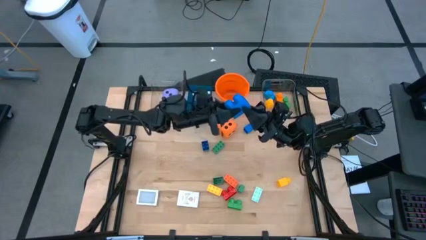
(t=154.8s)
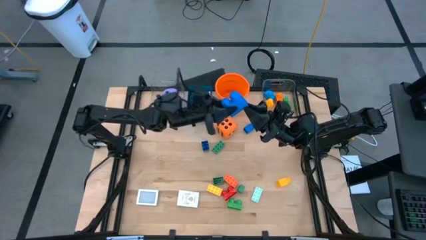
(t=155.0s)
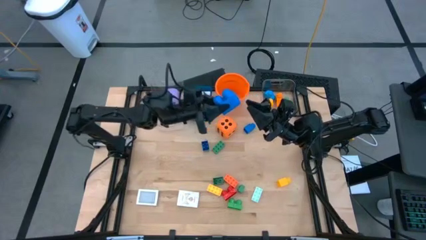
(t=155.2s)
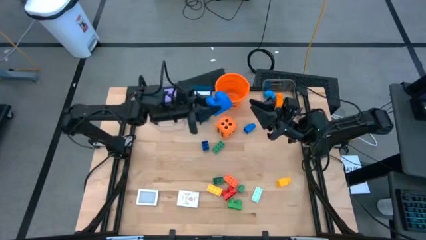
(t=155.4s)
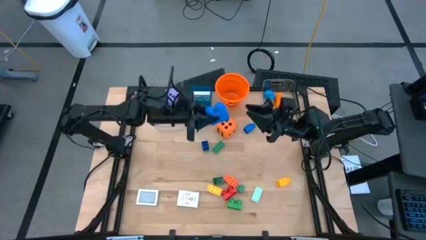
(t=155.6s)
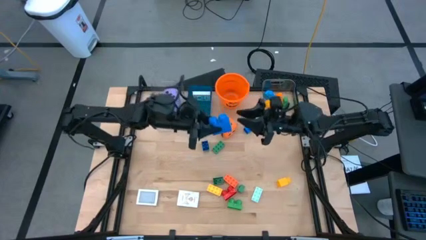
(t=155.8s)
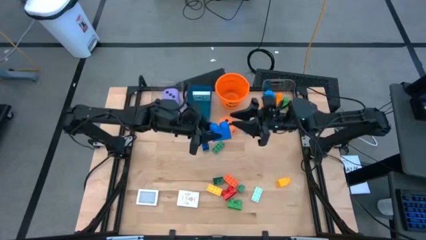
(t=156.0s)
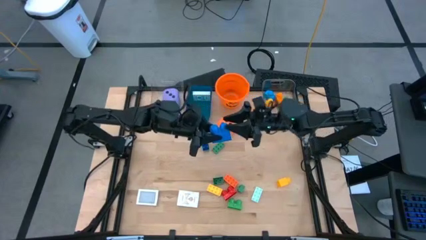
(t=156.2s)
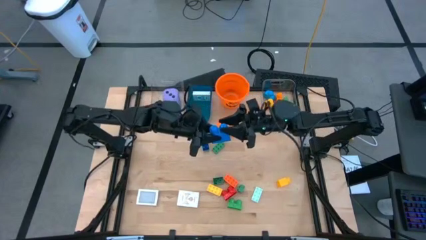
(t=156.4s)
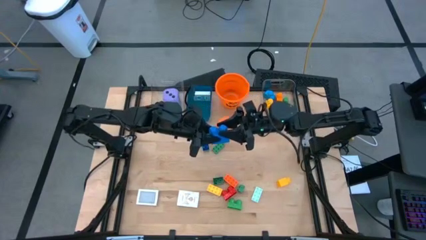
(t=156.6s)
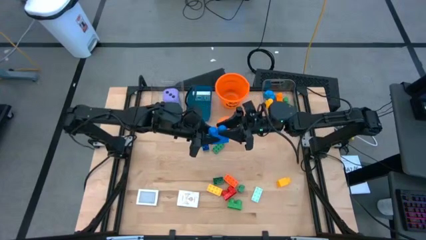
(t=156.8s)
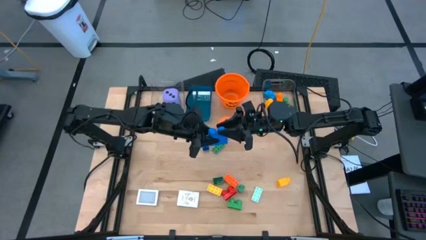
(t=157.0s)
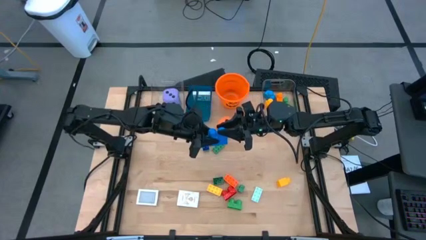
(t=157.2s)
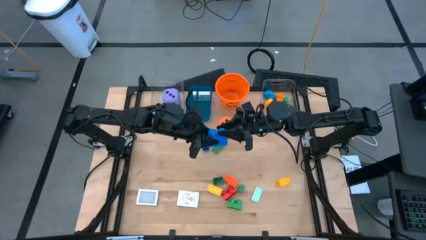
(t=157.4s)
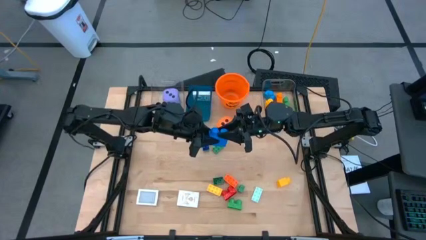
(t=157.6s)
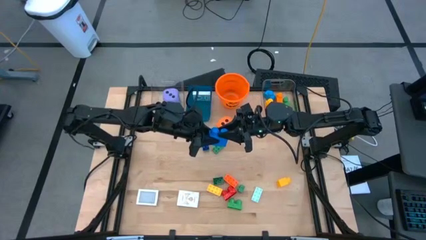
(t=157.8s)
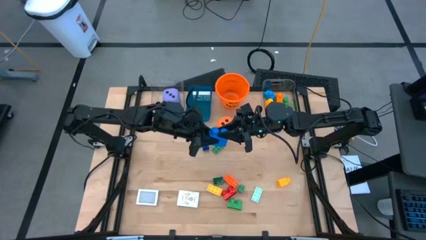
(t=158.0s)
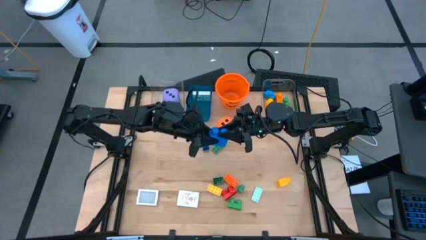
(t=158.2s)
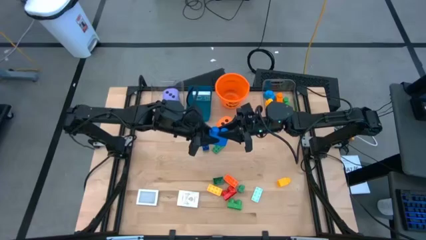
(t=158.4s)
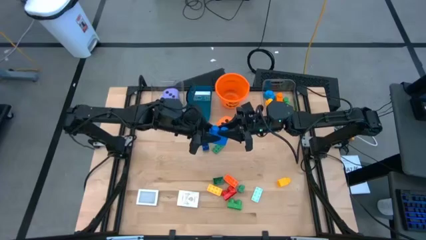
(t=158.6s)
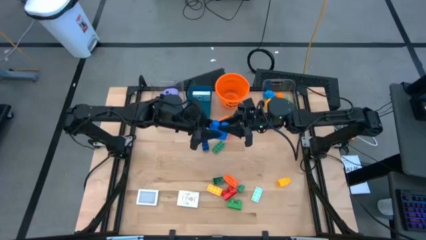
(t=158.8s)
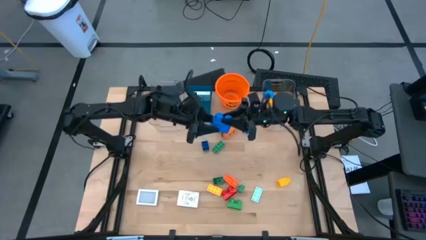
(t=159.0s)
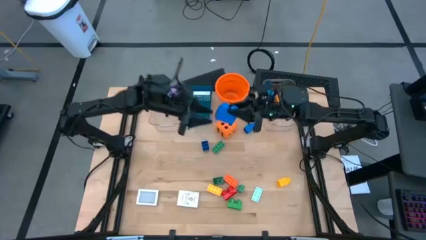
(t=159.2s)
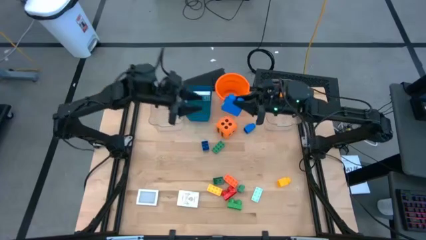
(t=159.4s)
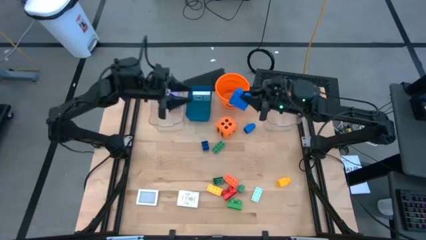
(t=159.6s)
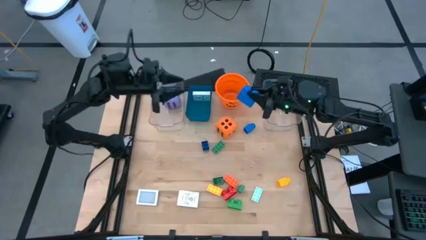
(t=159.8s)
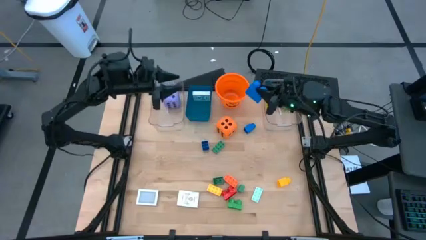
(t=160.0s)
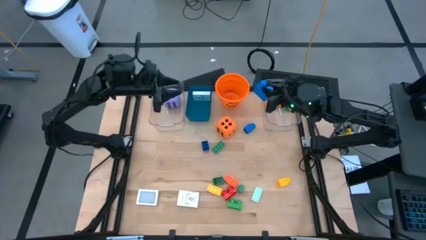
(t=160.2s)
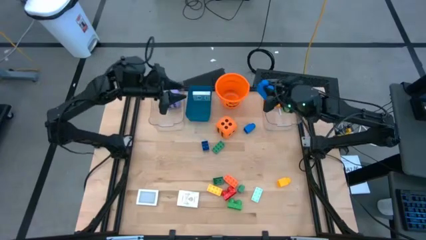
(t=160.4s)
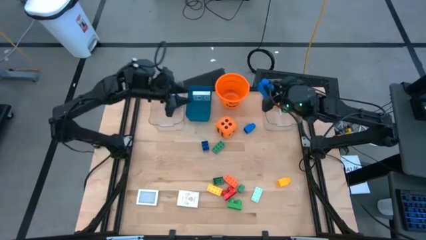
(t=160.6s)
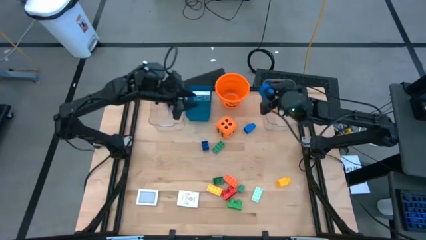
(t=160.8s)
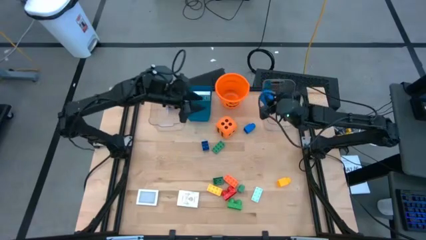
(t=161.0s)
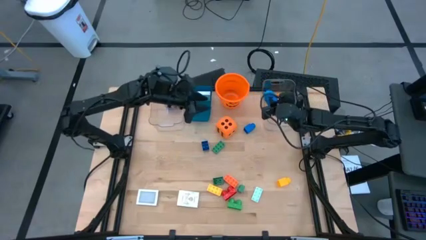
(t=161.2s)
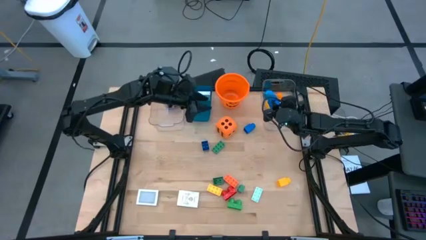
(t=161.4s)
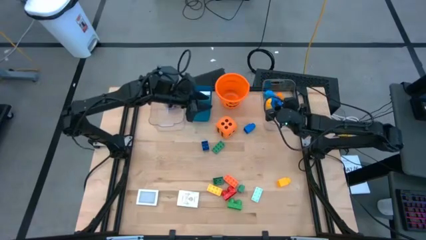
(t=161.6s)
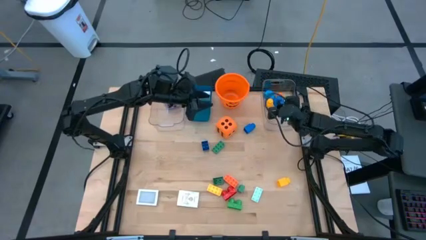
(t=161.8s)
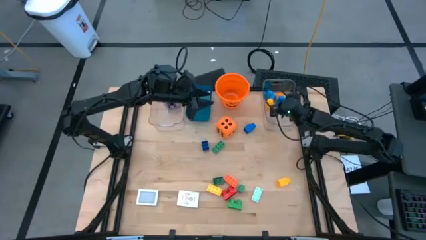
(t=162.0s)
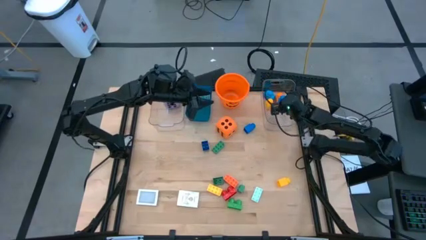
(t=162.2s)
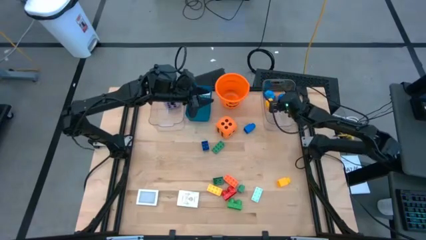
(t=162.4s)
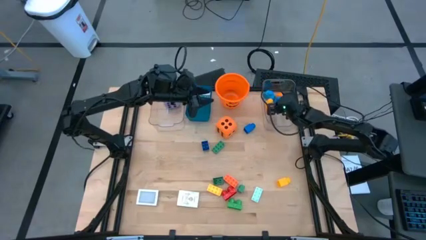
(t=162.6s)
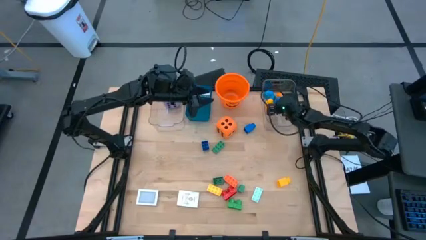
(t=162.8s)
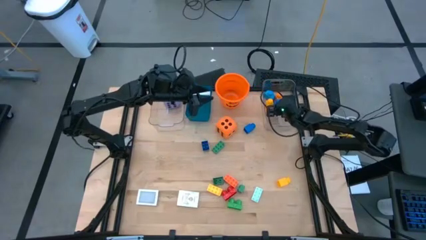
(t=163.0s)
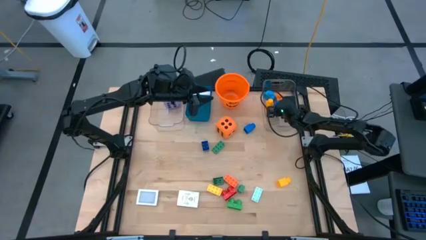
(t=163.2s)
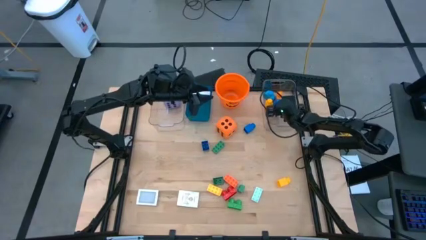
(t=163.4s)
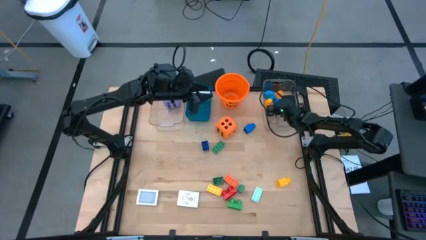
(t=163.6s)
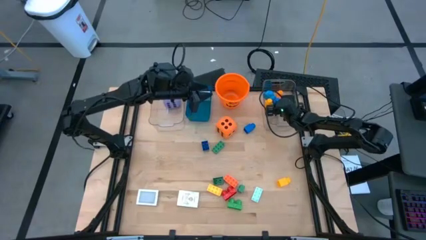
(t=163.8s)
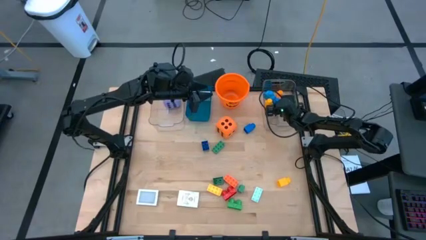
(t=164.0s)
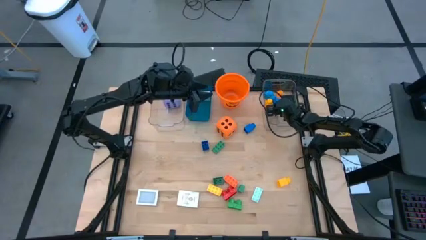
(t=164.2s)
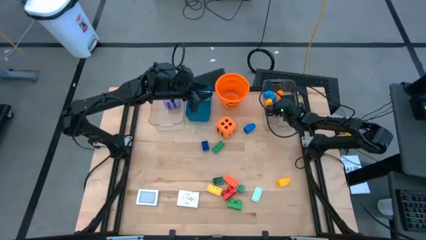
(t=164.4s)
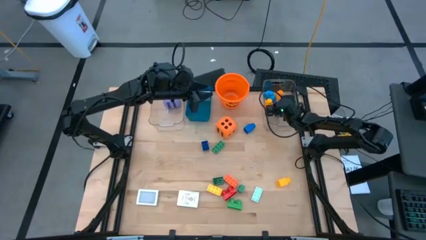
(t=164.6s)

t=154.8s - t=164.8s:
Task: Pick & Place Toys
Put the blue game piece into the right transparent bin

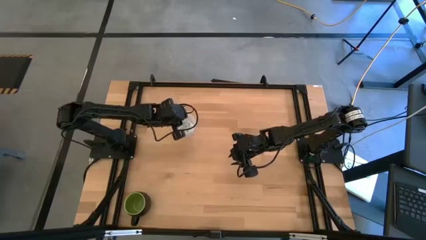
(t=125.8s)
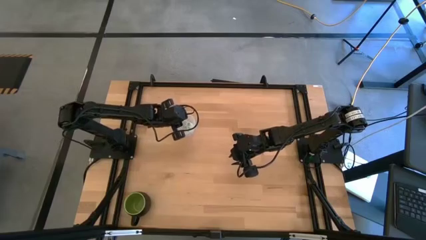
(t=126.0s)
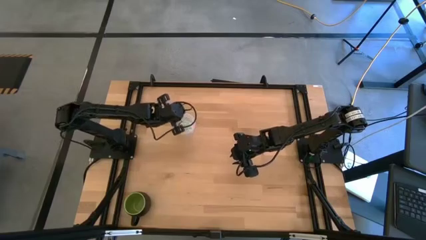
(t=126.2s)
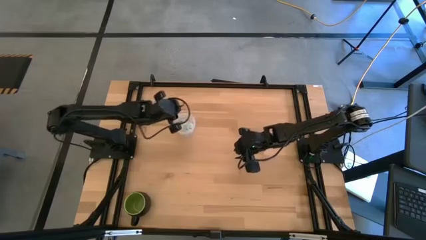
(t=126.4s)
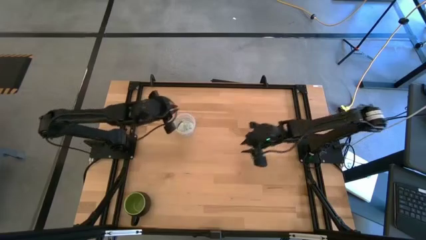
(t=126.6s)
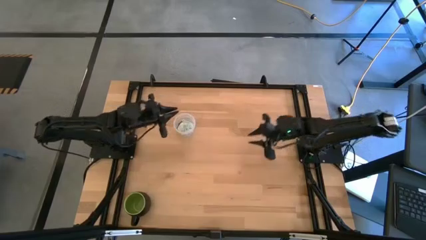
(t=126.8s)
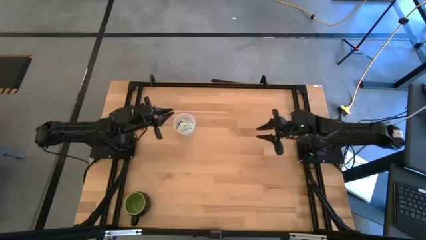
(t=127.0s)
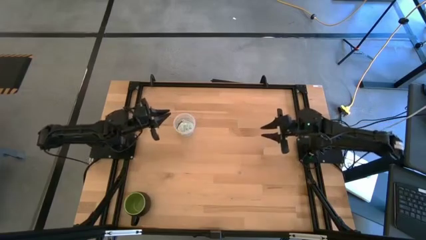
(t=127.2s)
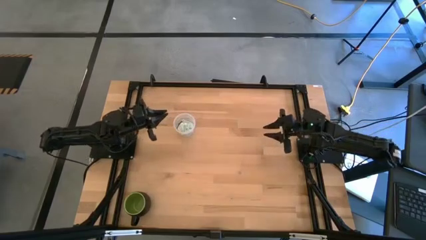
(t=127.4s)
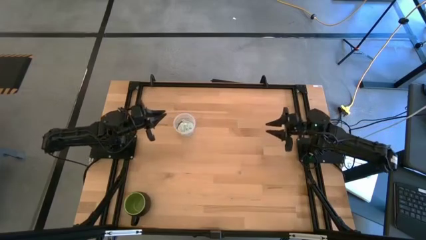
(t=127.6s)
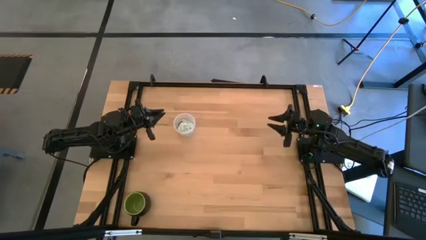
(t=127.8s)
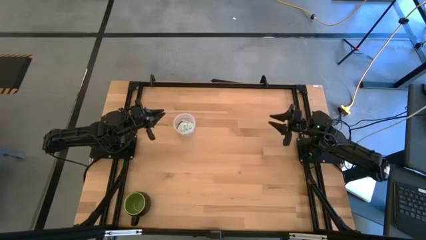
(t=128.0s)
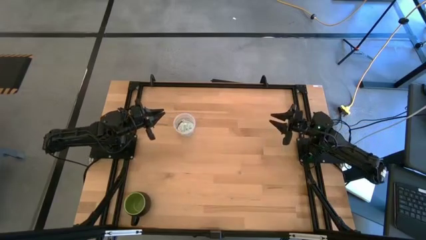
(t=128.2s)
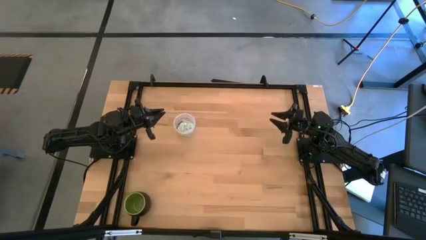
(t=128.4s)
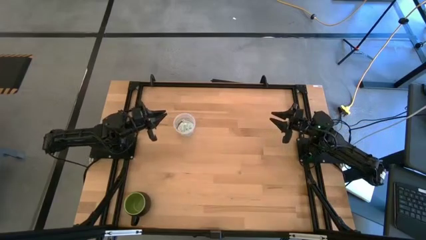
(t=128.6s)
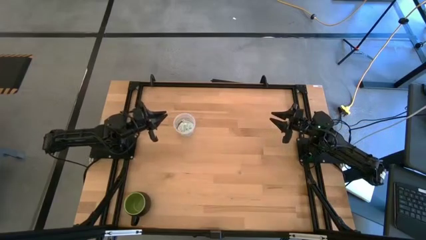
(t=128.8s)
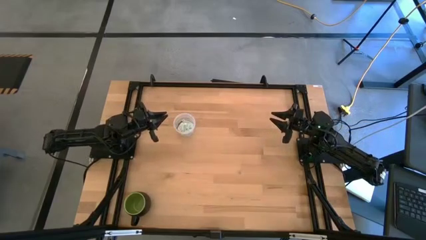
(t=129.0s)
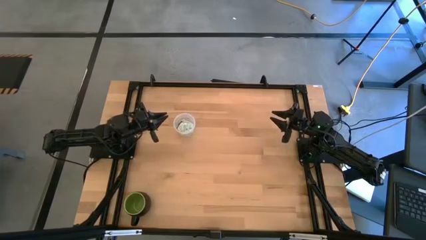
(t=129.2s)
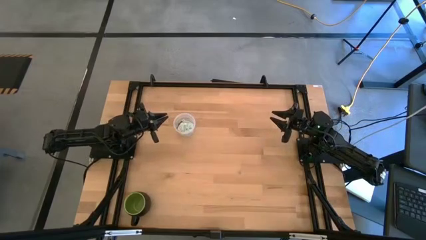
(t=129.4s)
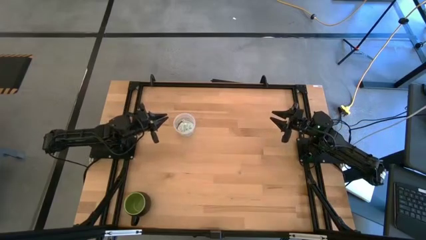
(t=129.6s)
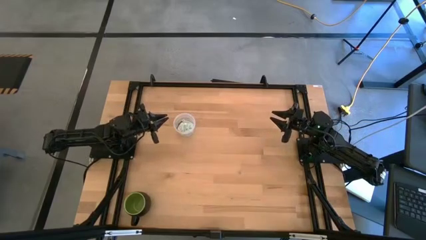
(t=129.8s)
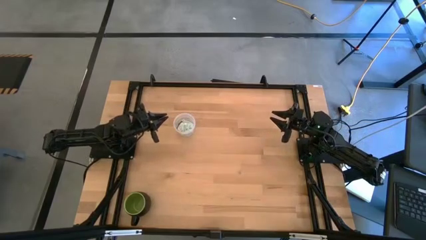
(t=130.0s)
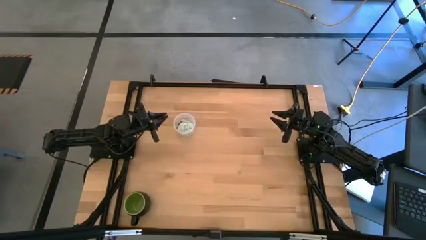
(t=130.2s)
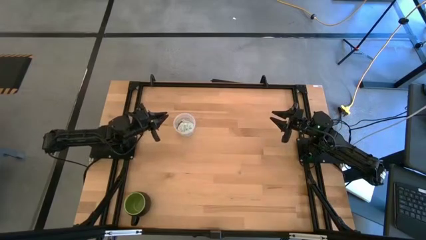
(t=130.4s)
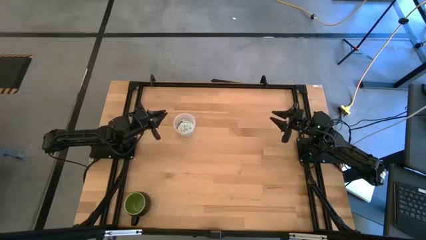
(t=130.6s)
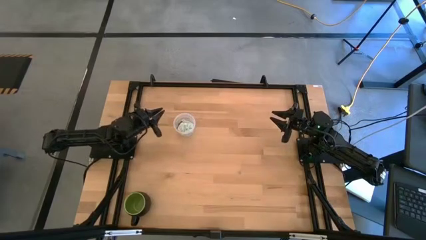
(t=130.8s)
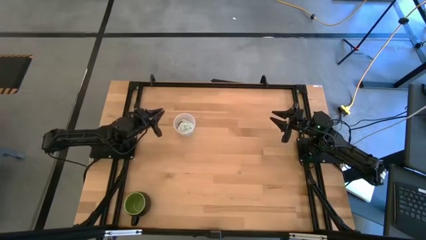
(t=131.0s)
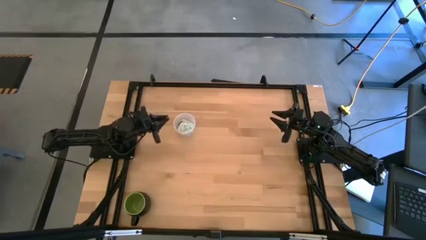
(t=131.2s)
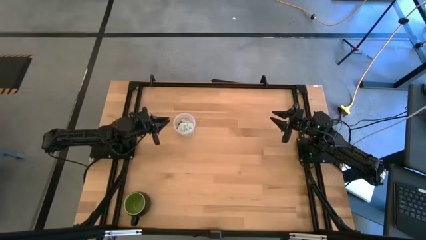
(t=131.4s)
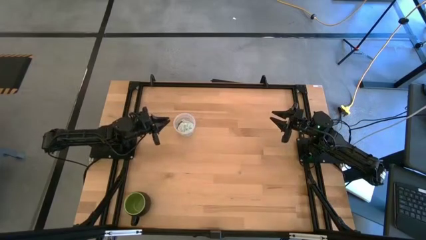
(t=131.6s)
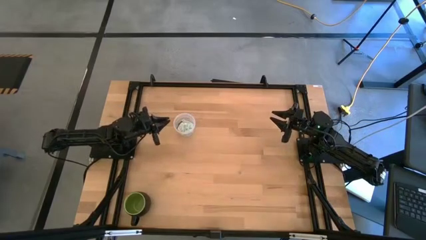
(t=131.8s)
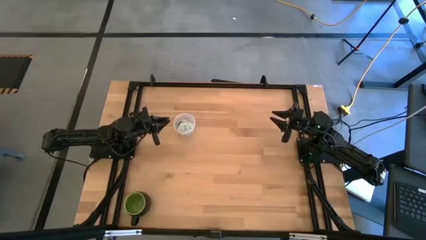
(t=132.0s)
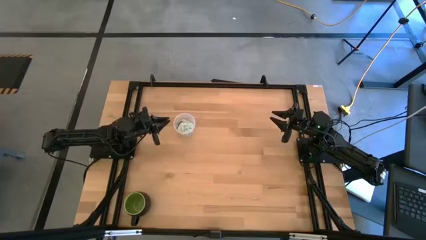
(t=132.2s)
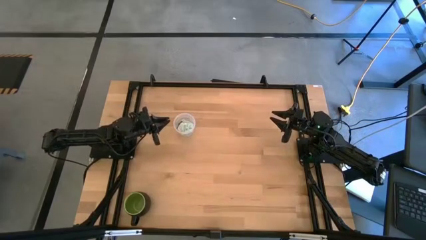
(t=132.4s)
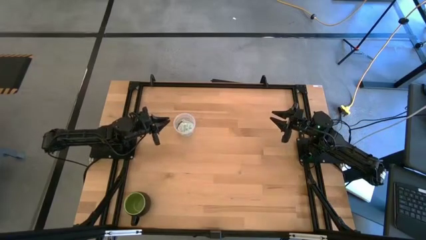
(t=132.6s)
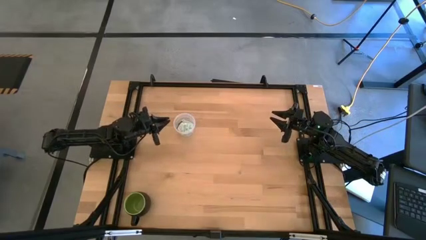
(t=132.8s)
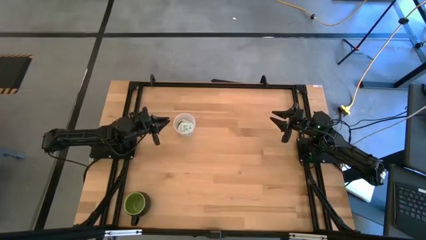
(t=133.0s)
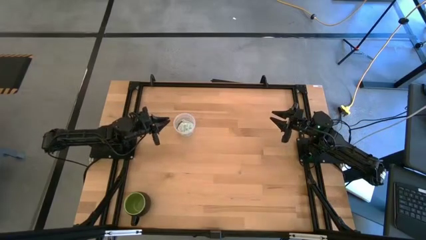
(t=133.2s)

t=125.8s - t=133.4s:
Task: Pick and place Stevia / Truvia into bins
Return to Home Position
